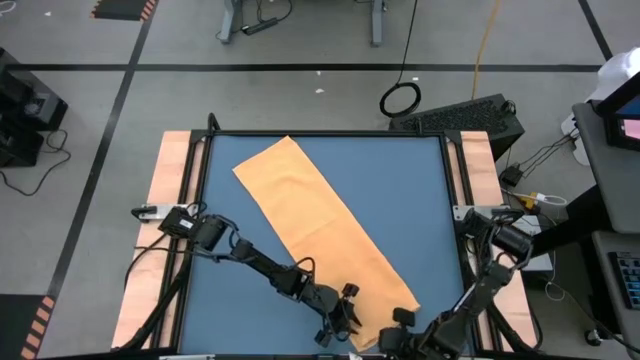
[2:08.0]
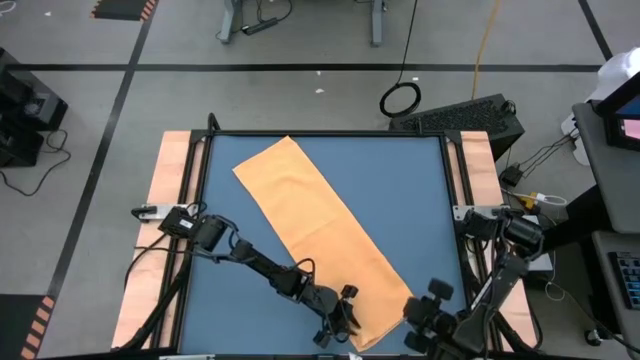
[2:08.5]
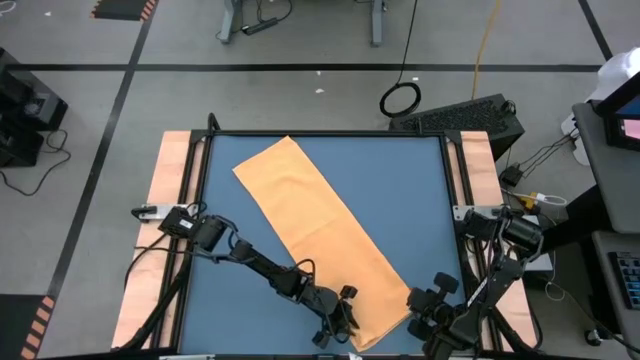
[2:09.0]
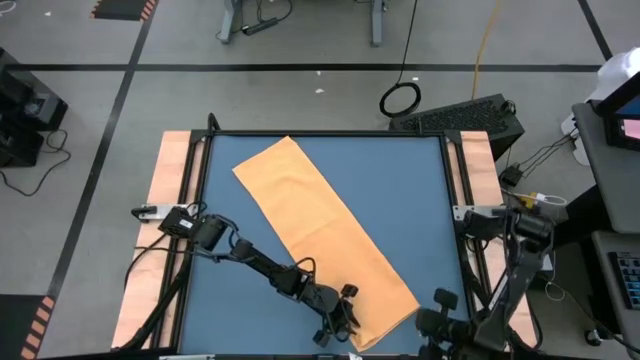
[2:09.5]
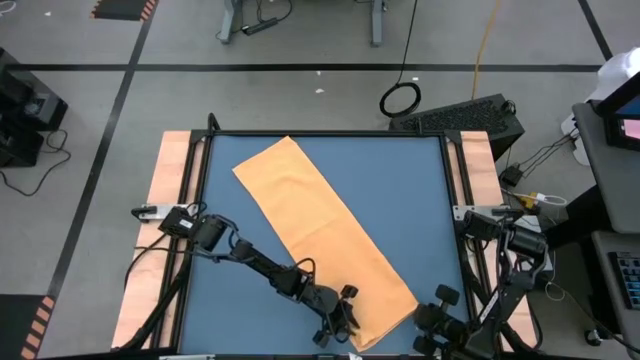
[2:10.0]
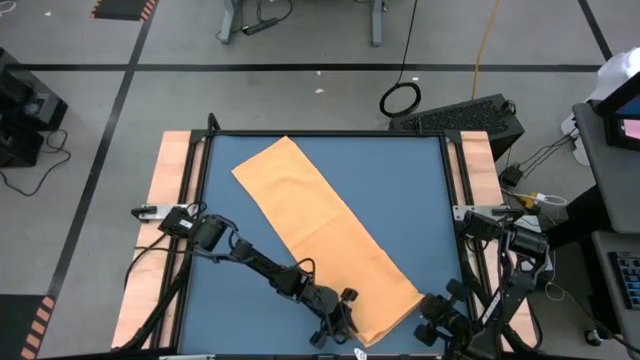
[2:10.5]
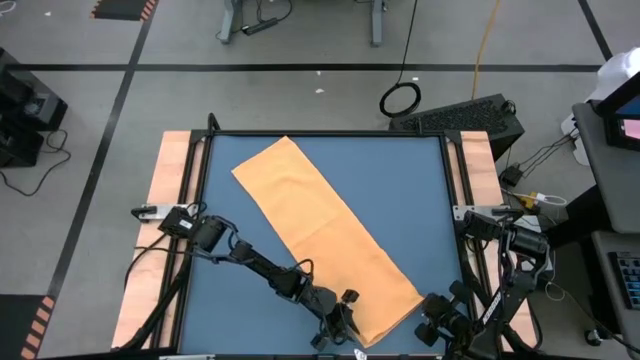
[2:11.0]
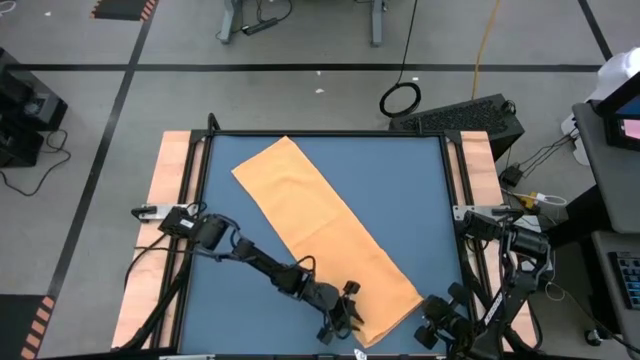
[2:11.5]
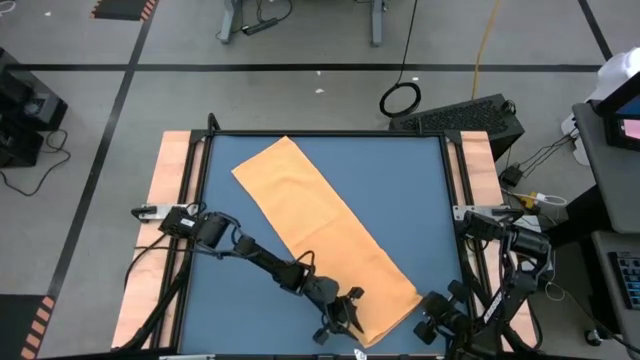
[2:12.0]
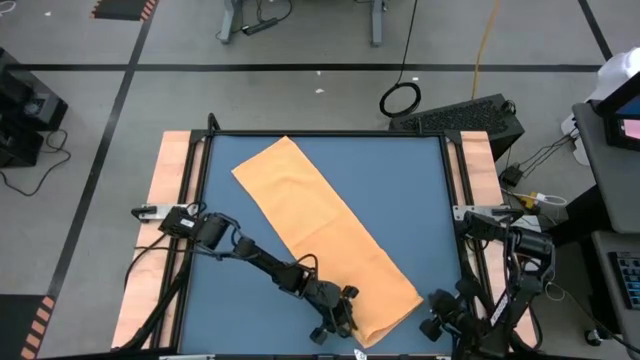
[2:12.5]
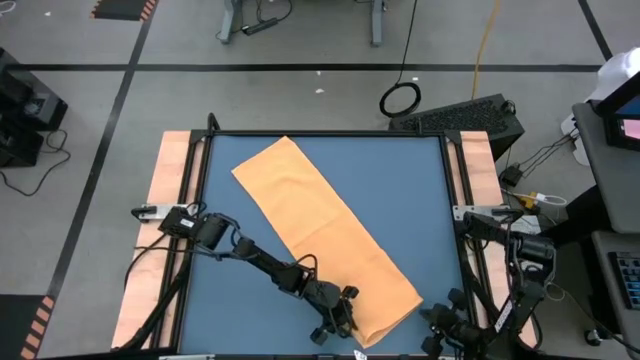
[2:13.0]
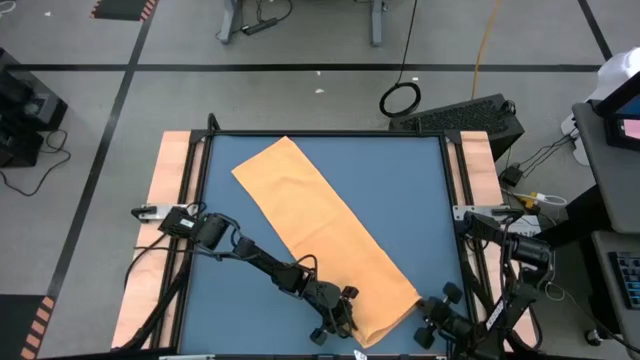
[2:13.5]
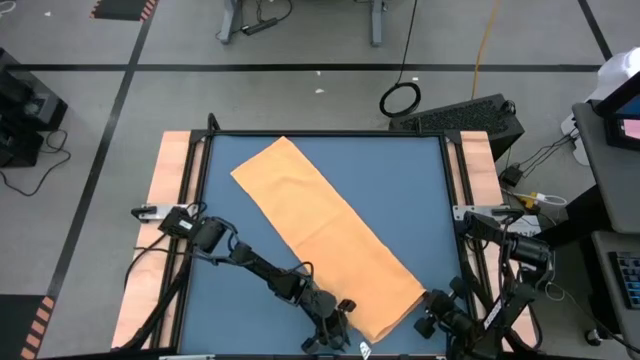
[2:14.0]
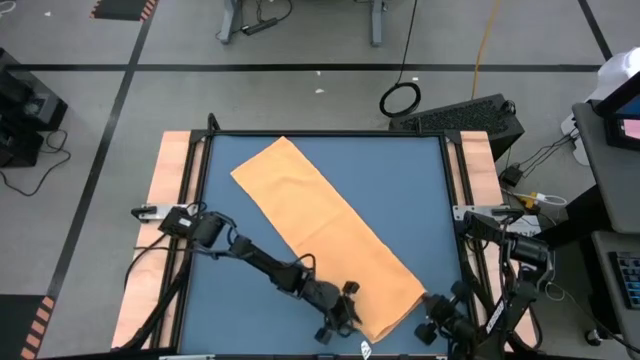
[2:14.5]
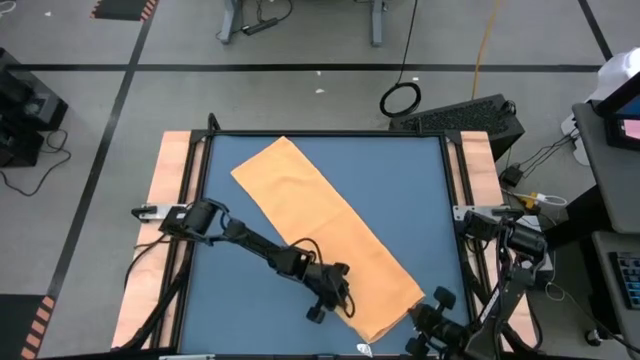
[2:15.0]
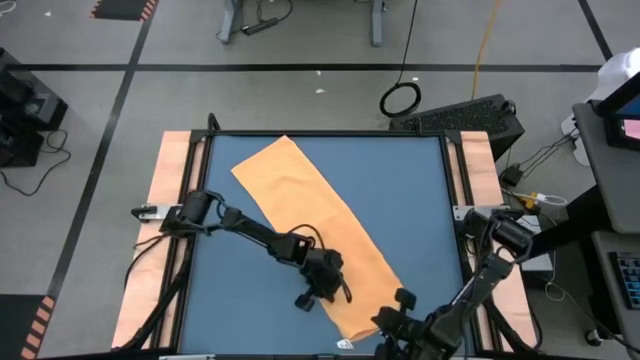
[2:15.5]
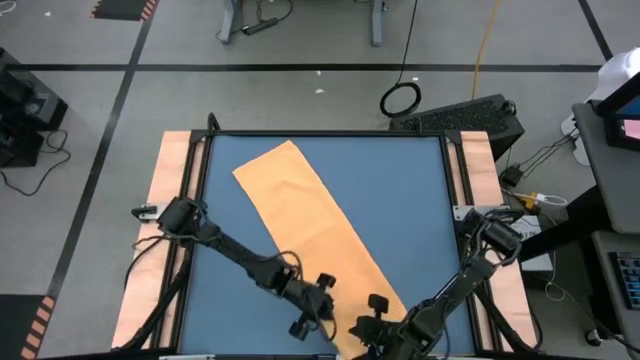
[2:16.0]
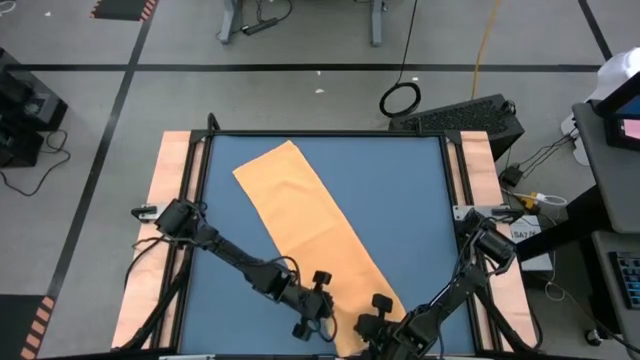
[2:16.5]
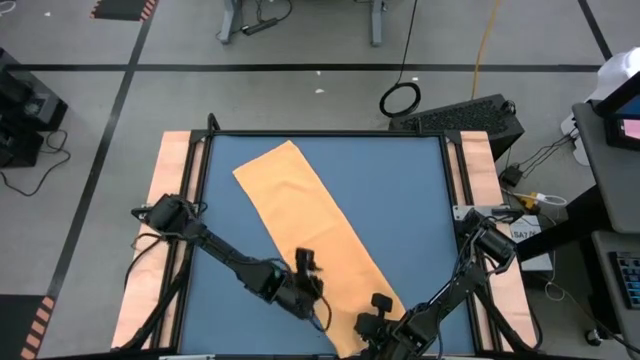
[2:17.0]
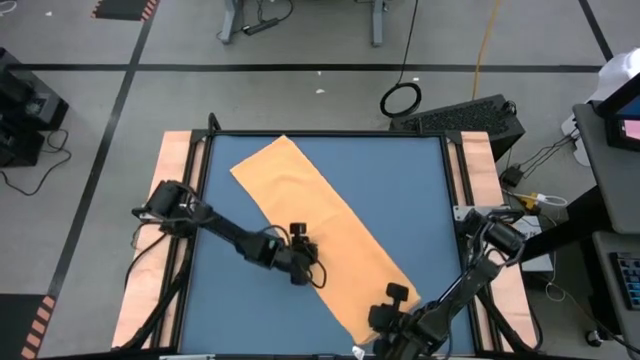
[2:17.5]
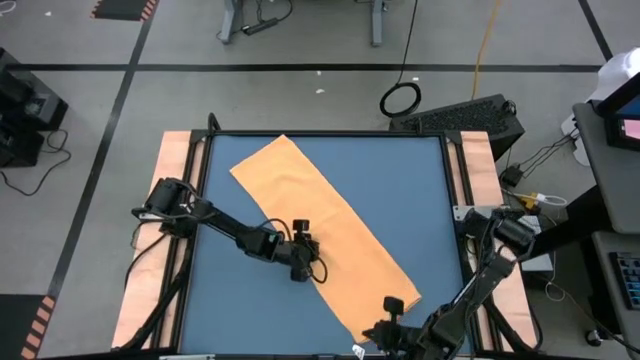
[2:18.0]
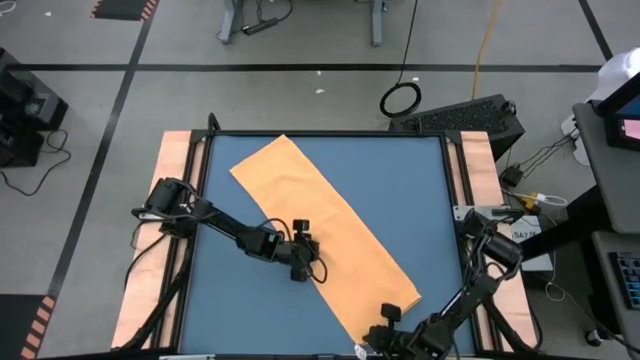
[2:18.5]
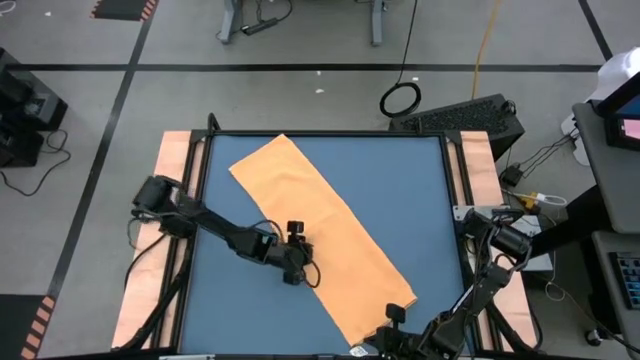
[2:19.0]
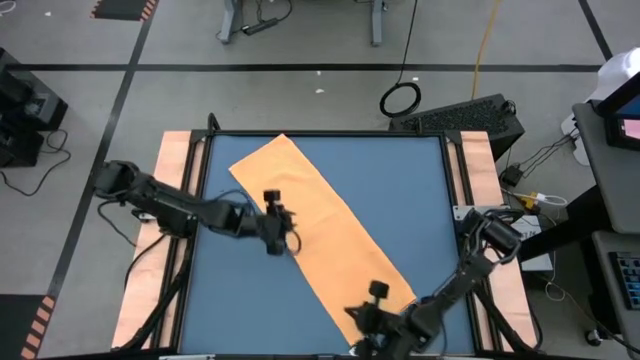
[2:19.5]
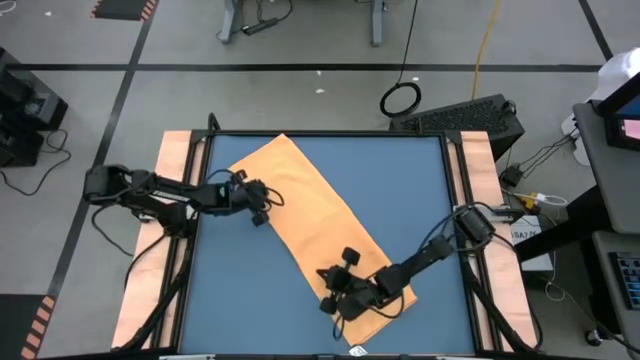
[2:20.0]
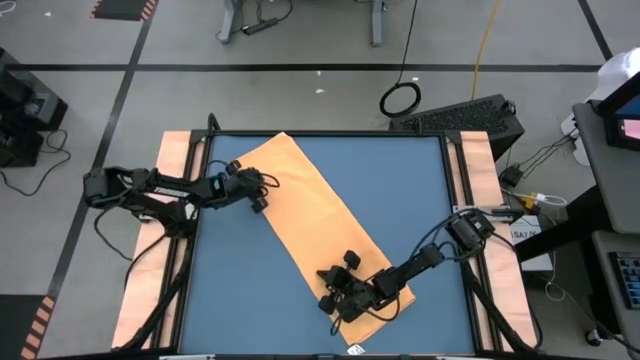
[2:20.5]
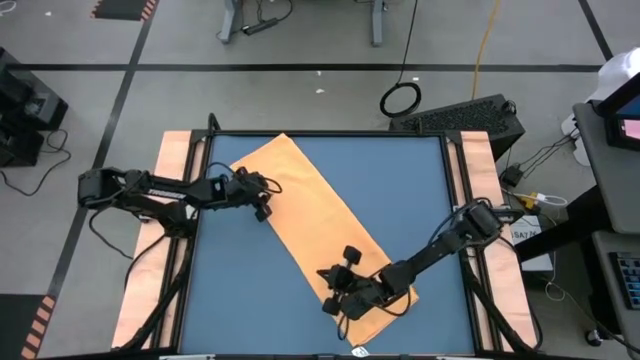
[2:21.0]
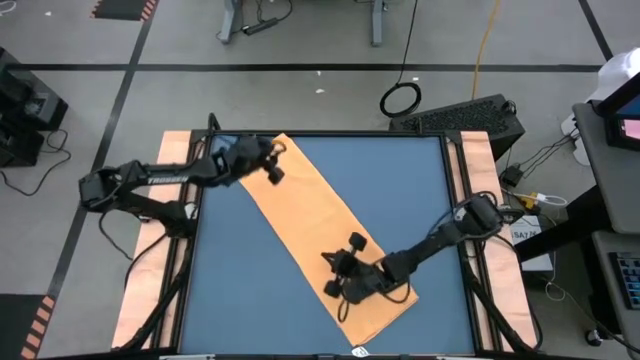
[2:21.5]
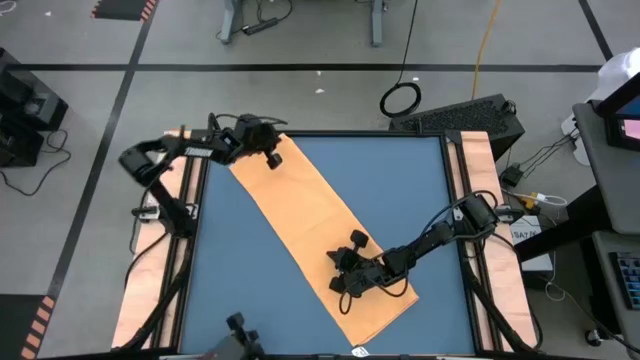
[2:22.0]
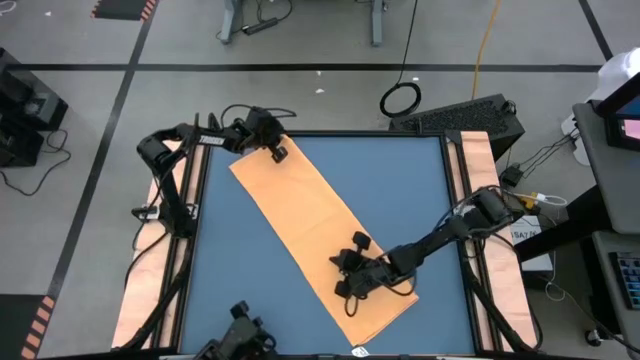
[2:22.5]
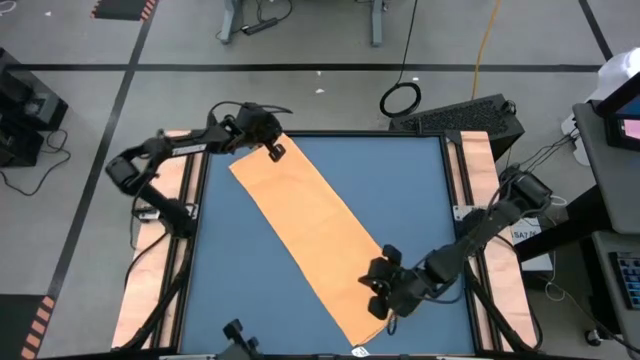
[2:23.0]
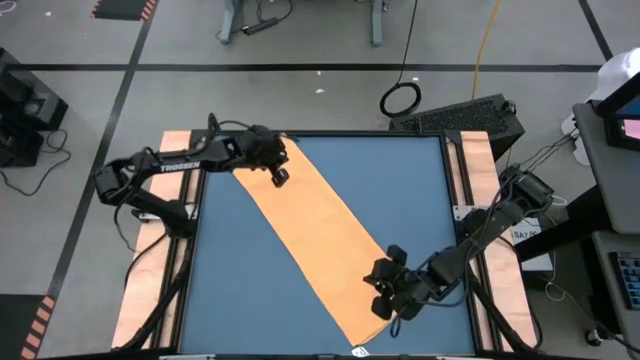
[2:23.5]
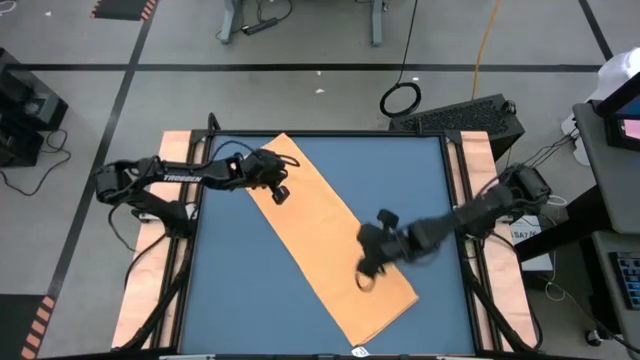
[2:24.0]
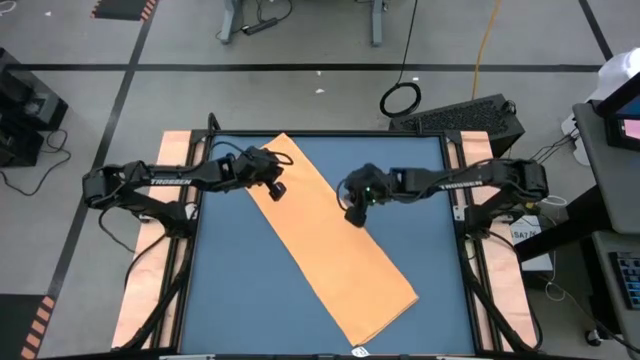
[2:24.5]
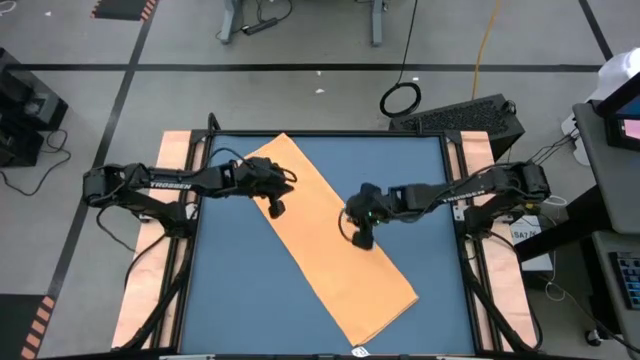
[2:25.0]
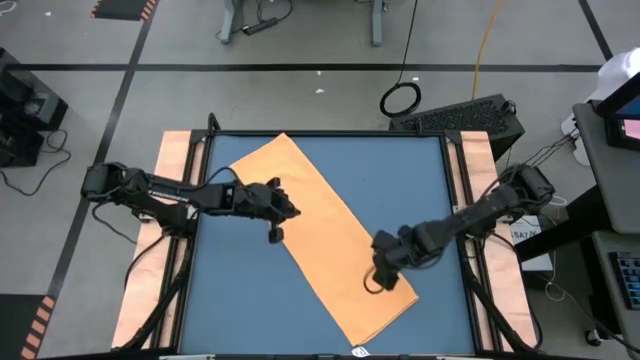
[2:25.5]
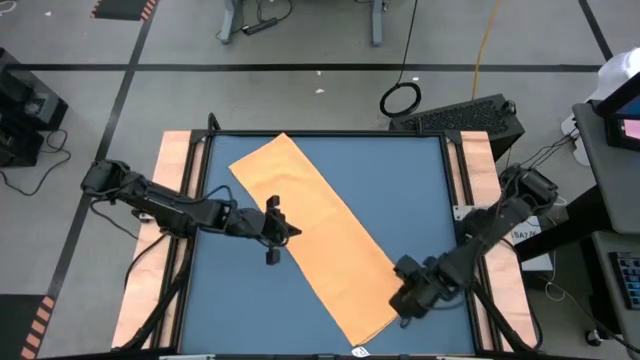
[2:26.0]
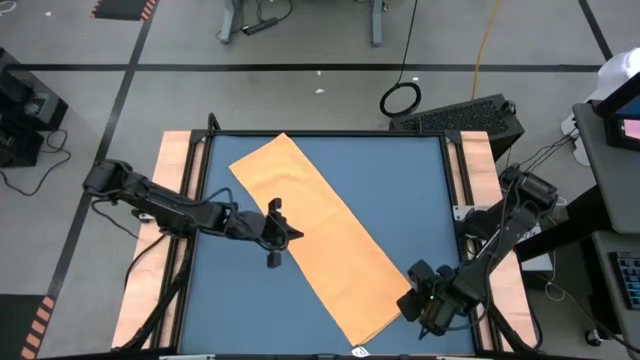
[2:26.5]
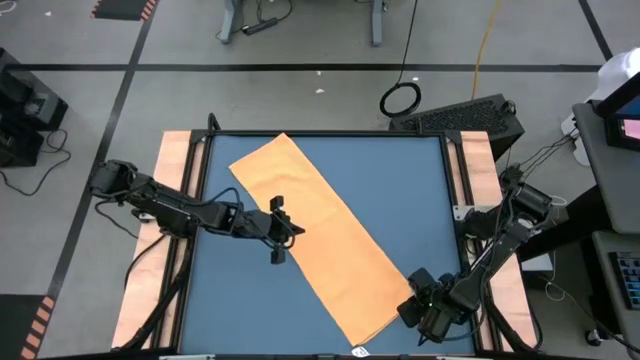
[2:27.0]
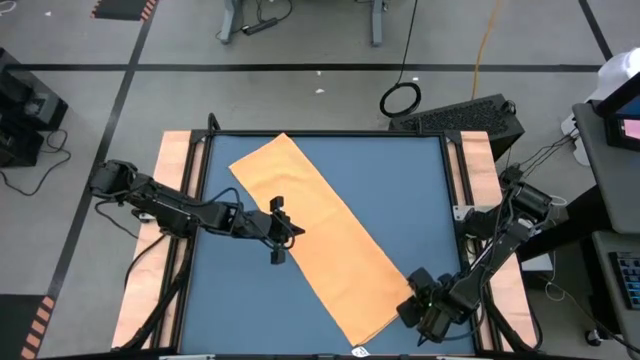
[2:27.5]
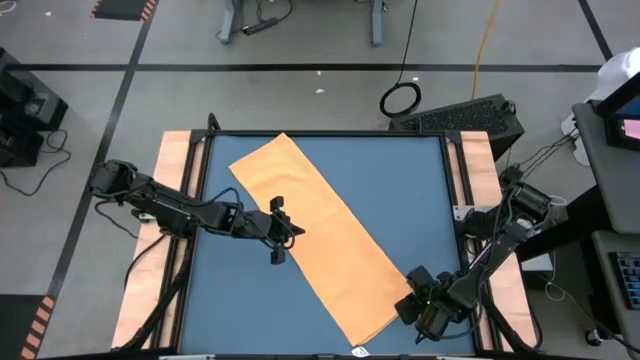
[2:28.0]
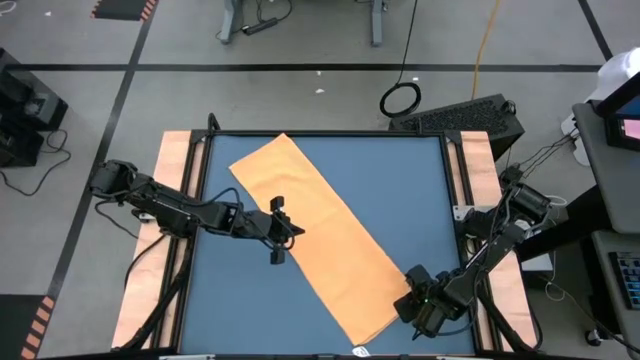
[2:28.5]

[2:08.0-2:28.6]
Task: Roll towel into tight, uniform cylinder
Fold the orange microfiber cloth

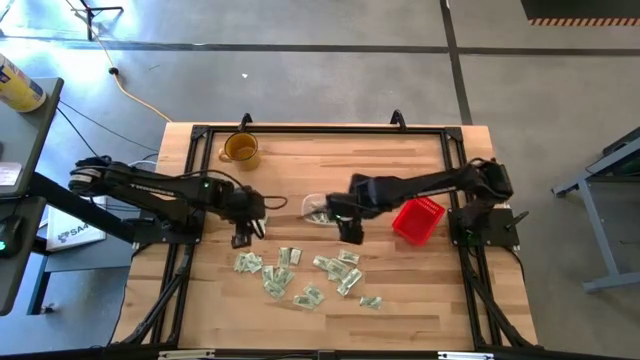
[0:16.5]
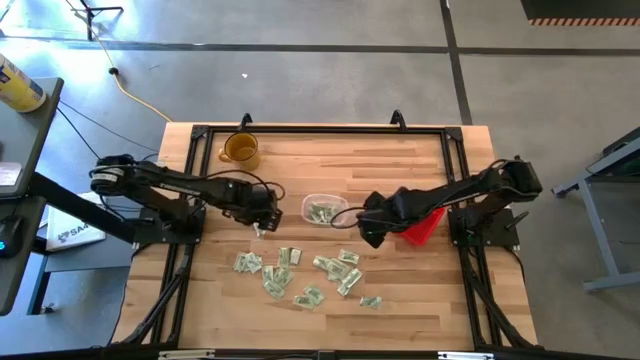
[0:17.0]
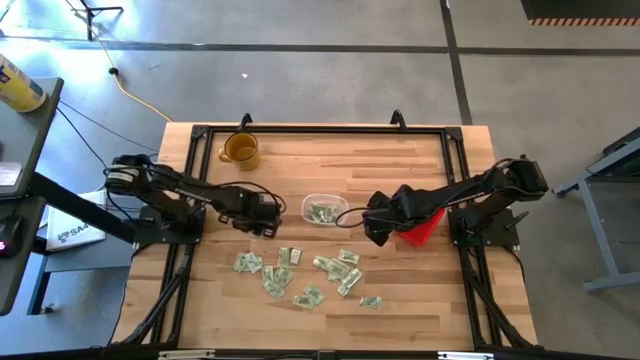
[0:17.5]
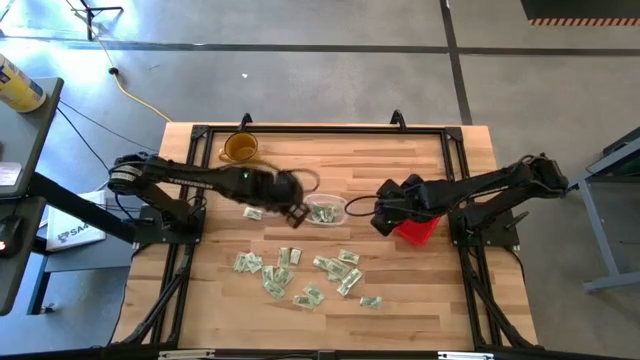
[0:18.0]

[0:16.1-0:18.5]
Task: Pick and place items into bin
Put the white stevia packet into the transparent bin
